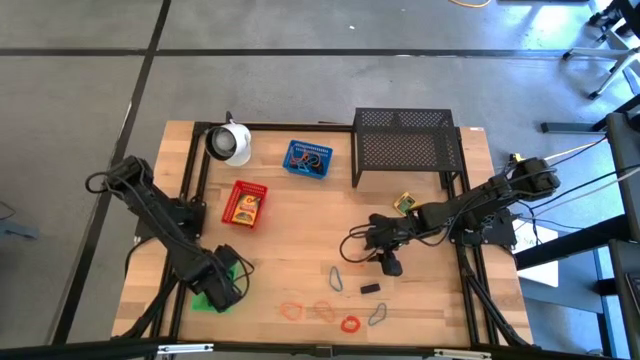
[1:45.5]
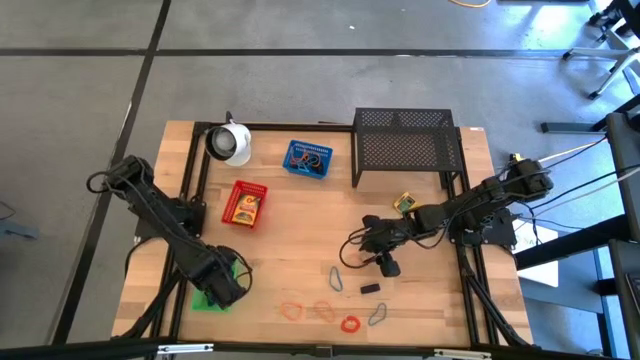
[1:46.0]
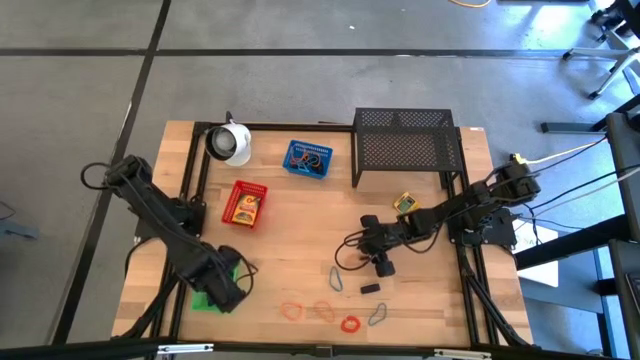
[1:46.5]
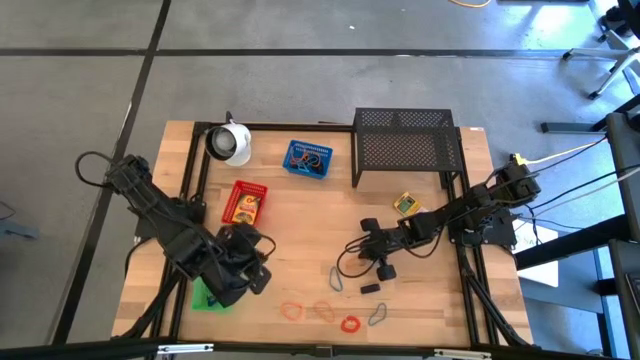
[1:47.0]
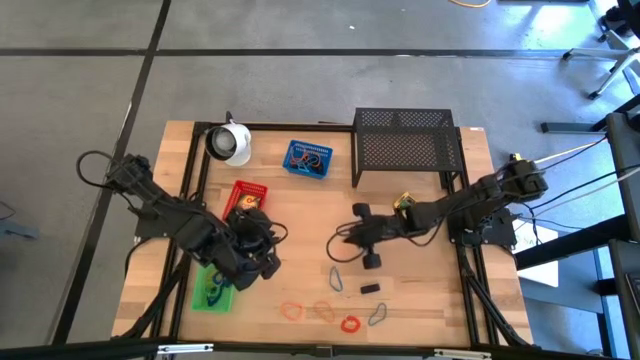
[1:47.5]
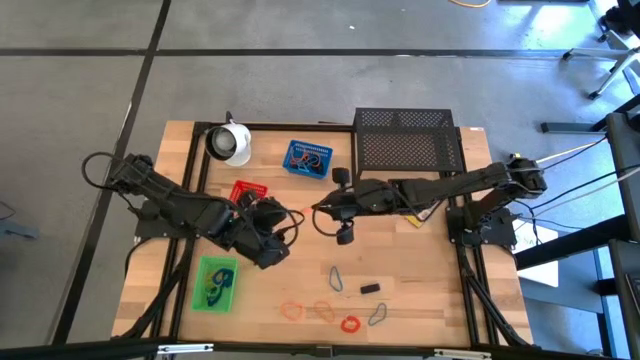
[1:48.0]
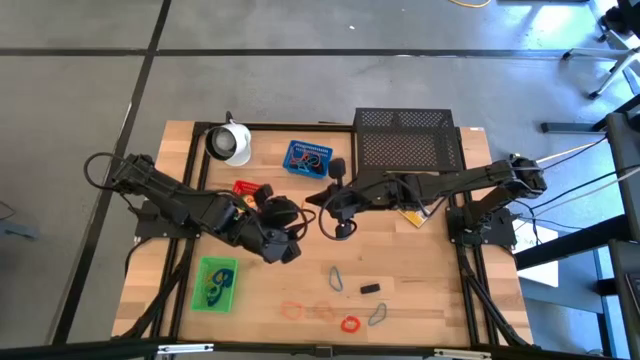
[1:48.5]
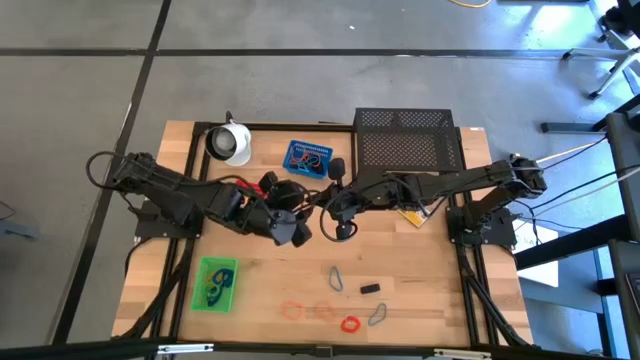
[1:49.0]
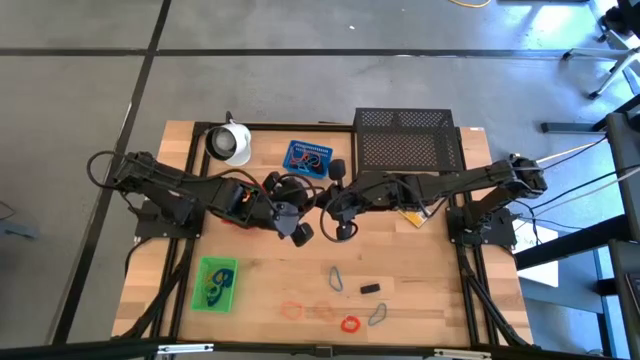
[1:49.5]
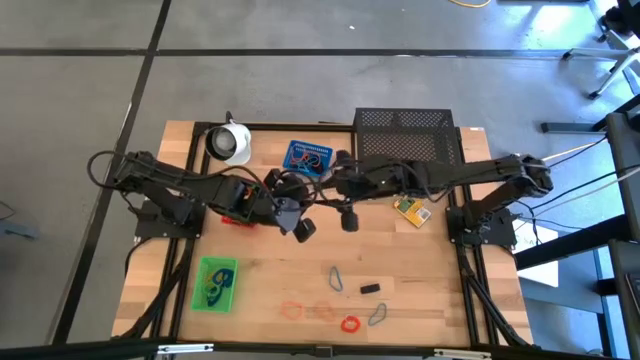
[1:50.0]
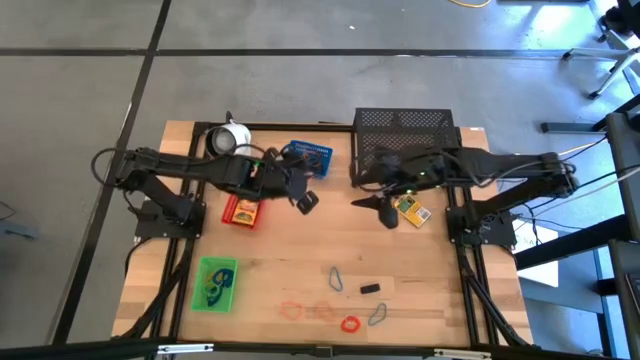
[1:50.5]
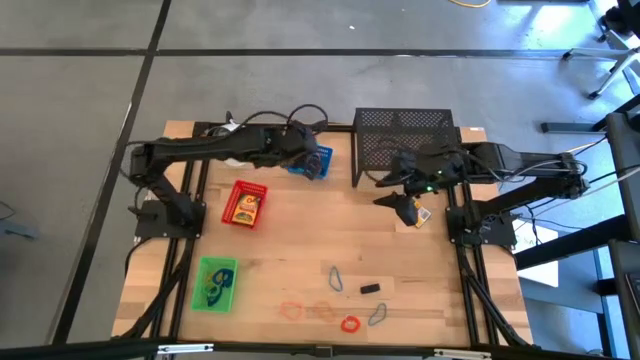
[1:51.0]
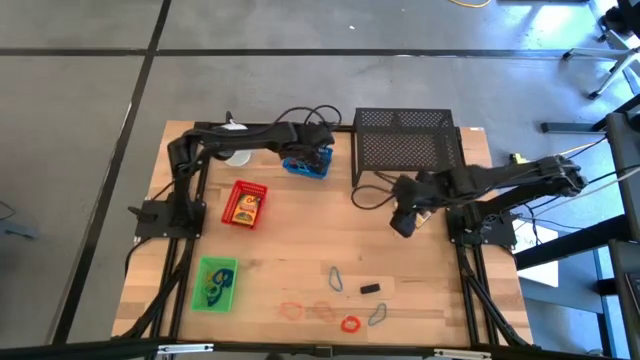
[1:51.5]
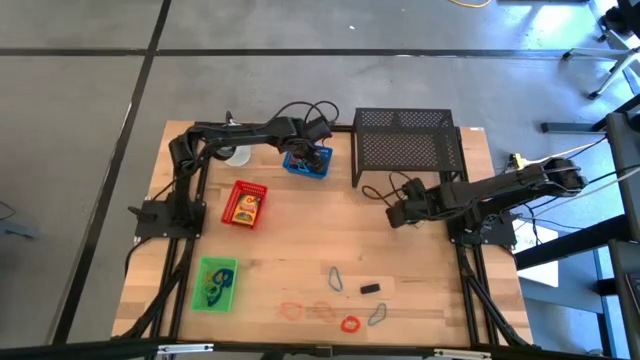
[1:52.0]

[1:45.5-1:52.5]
Task: Pick & Place Office Desk Supplies
Put the orange rubber band into the blue bin

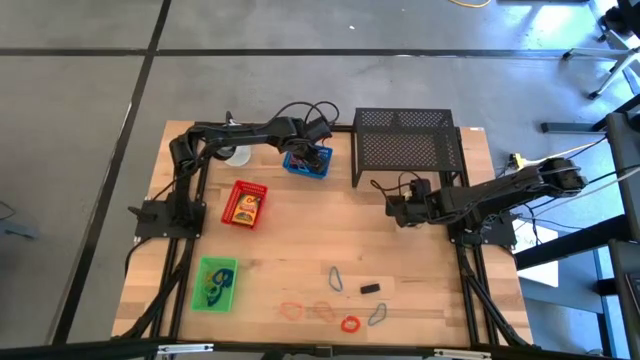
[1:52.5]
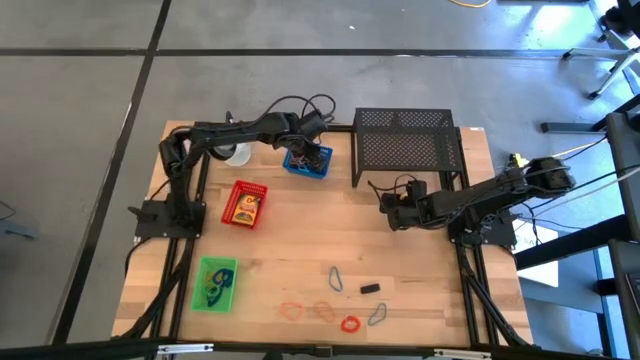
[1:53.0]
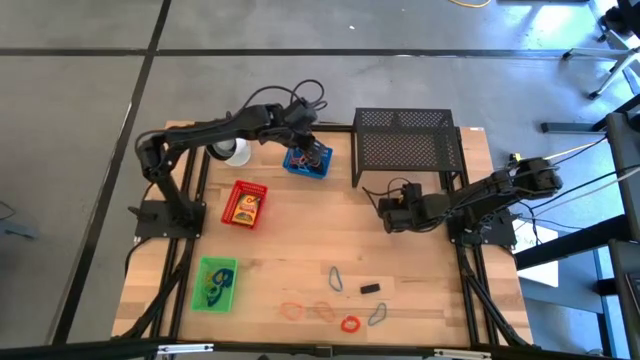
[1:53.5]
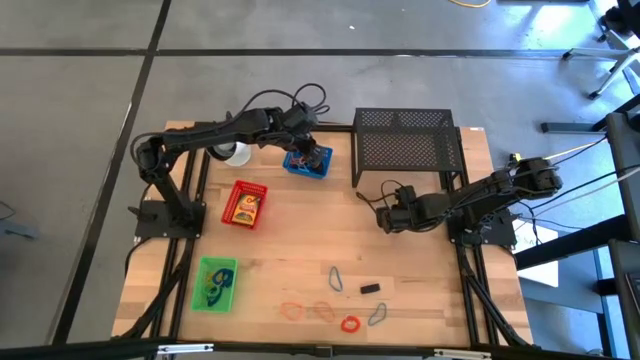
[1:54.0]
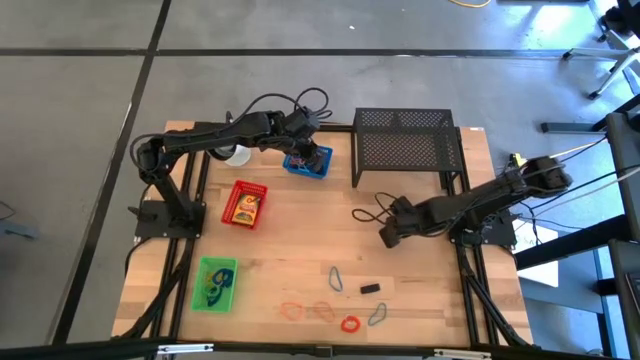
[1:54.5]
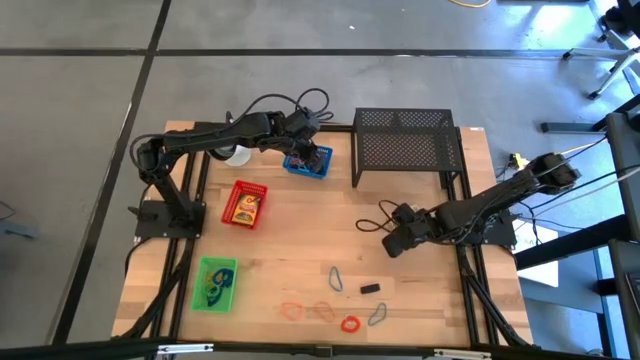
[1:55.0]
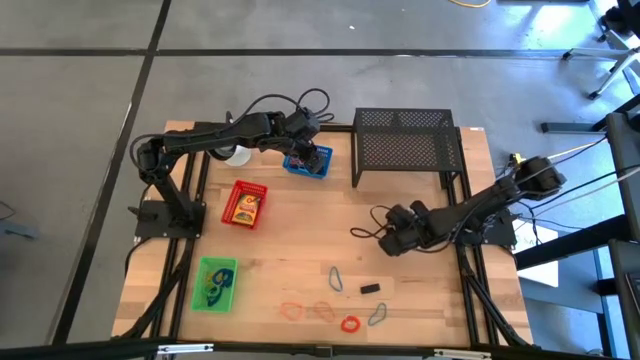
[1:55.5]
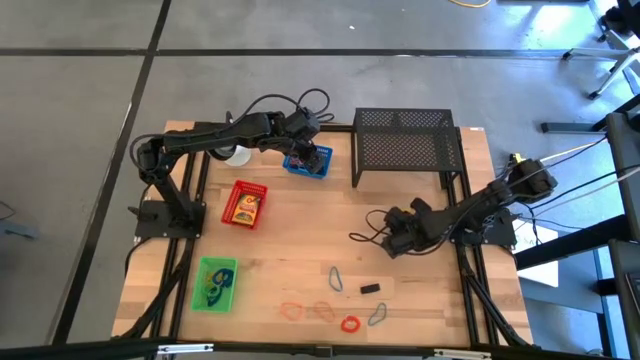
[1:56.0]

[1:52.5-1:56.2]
Put the yellow crayon box into the red bin

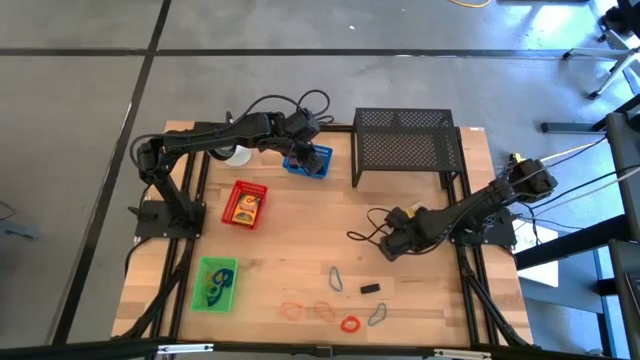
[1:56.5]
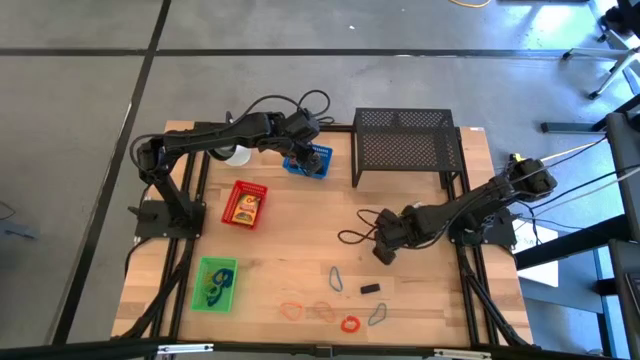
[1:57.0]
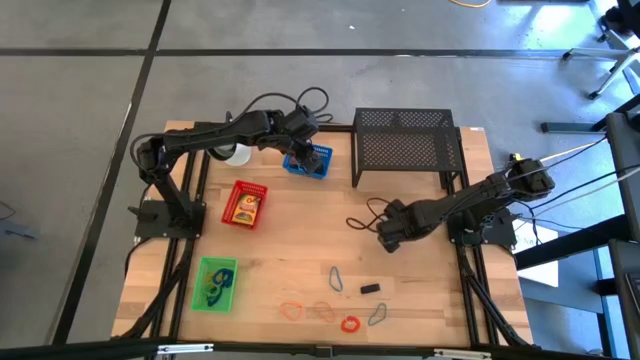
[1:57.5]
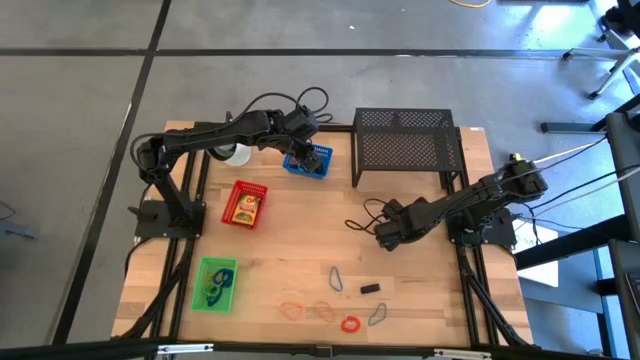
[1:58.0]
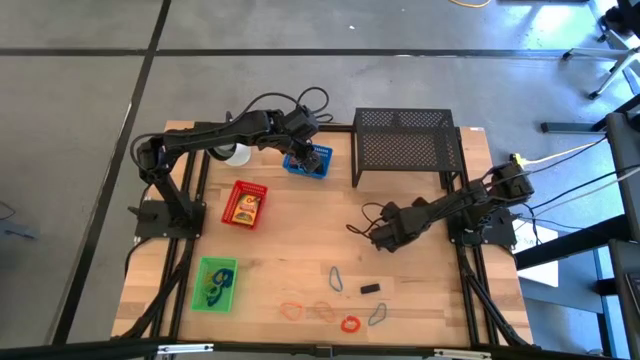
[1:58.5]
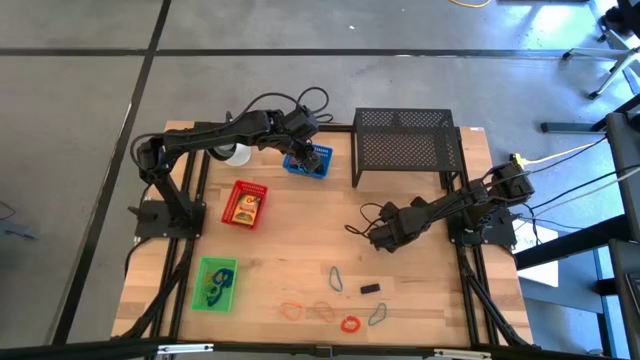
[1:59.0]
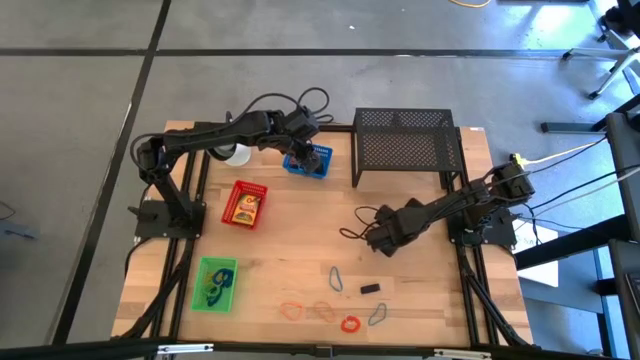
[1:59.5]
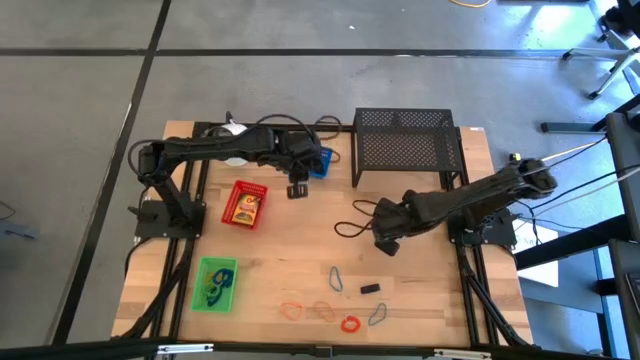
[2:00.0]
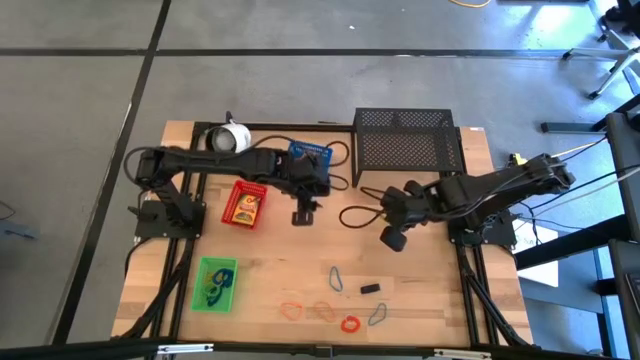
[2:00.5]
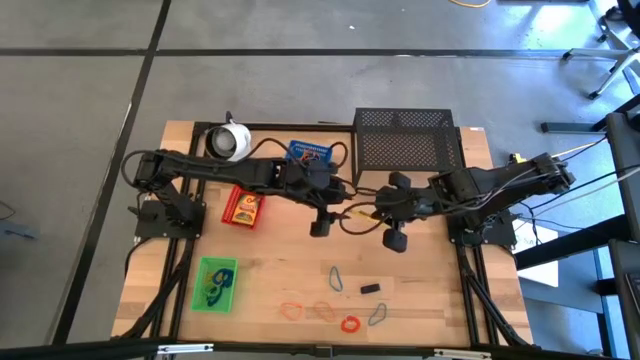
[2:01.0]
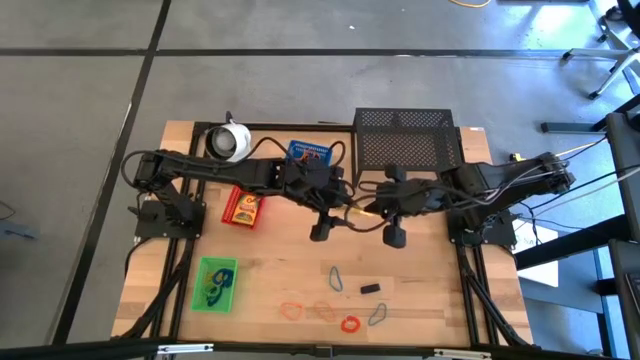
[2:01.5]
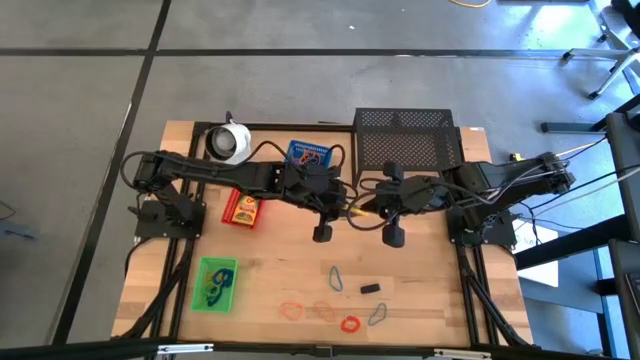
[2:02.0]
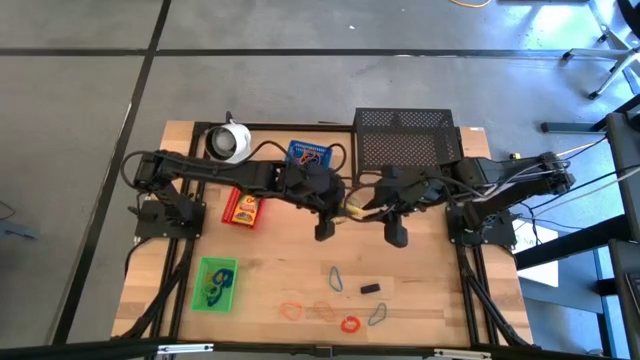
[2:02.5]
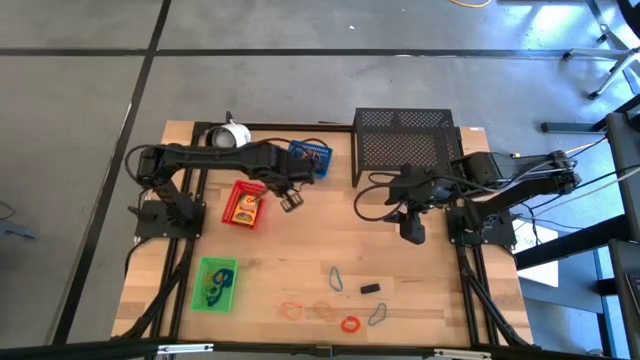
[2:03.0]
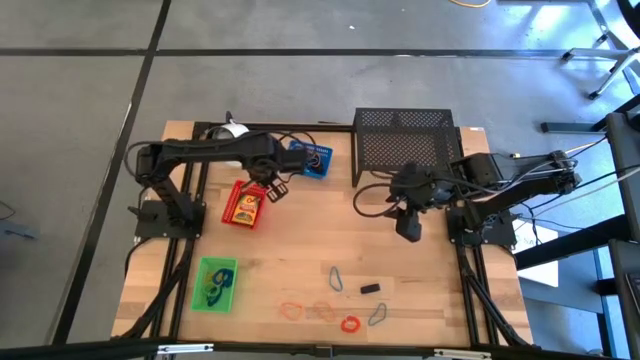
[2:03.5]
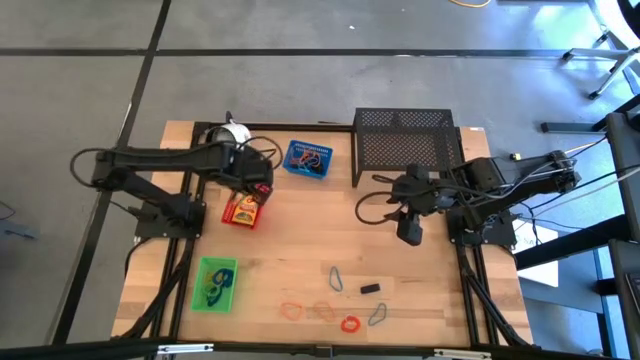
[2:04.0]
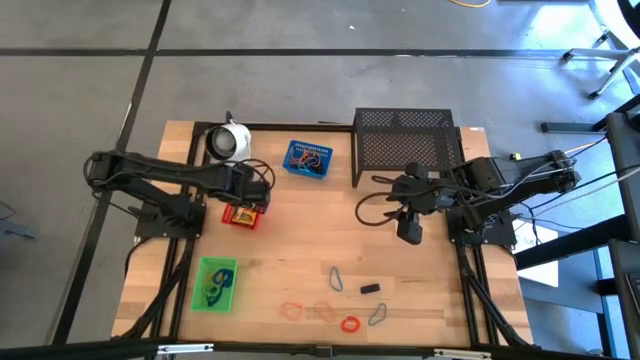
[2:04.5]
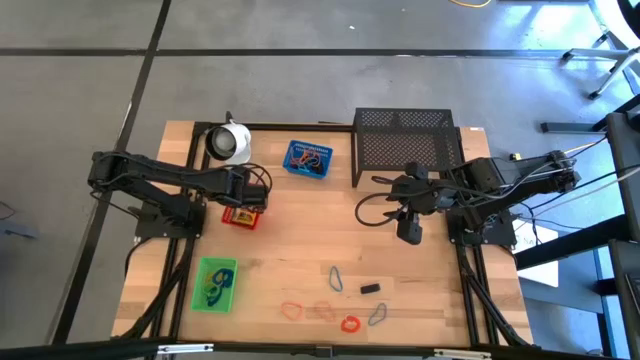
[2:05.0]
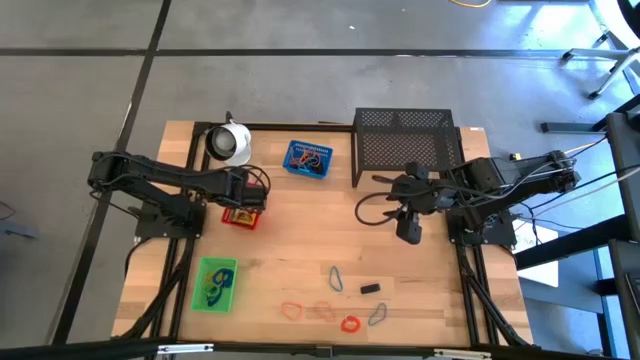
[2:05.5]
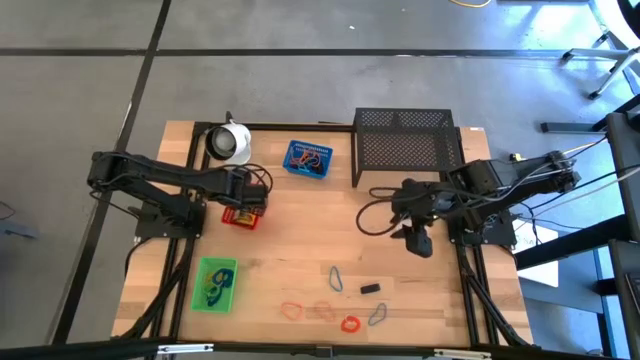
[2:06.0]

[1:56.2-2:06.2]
Put the yellow crayon box into the red bin
